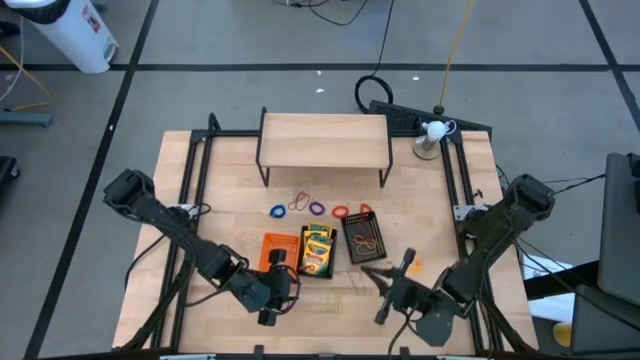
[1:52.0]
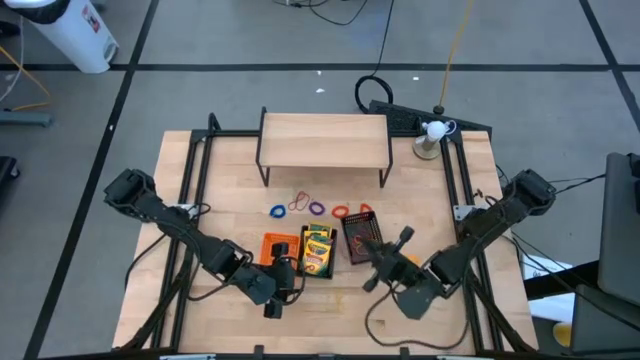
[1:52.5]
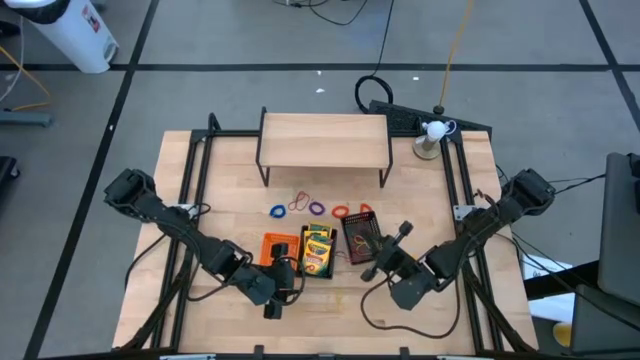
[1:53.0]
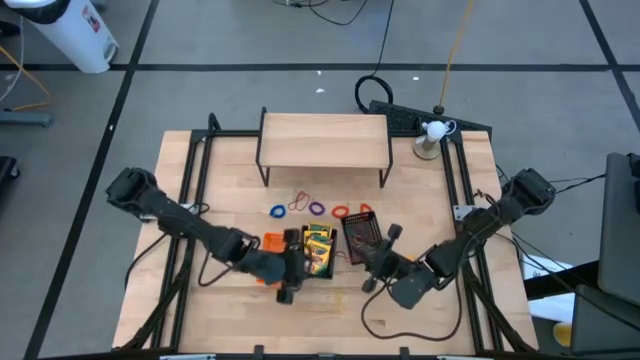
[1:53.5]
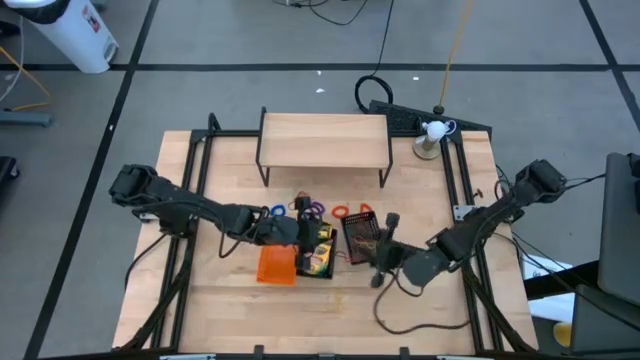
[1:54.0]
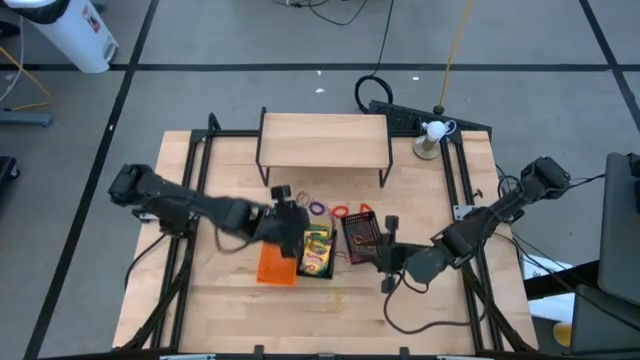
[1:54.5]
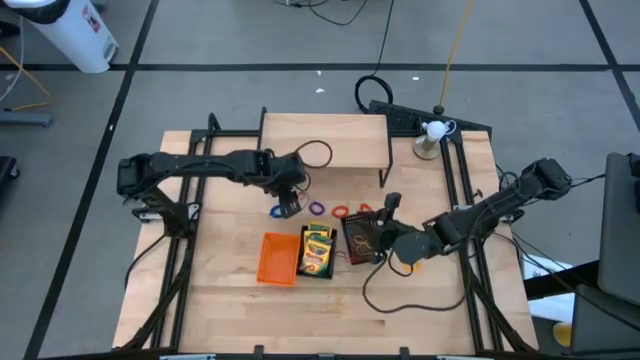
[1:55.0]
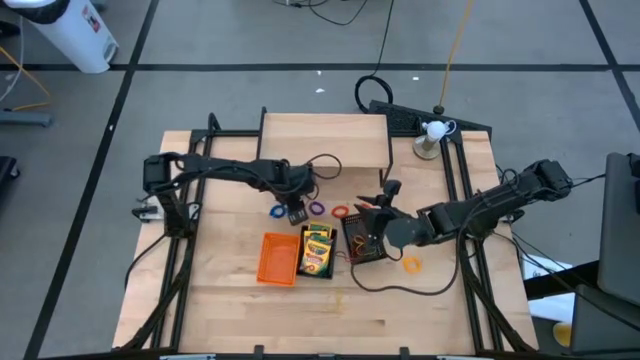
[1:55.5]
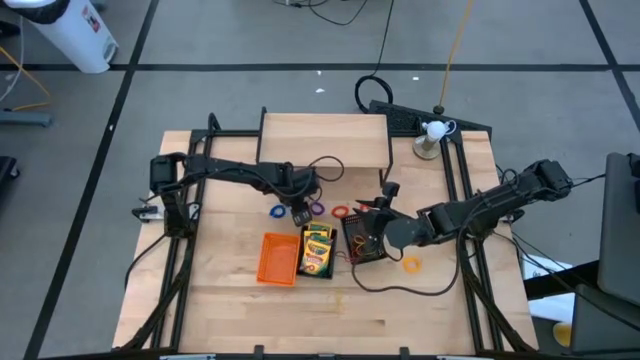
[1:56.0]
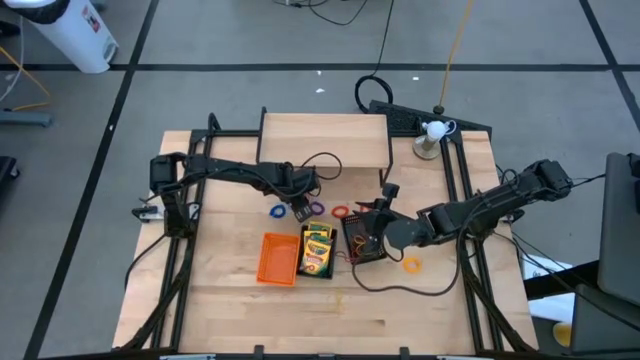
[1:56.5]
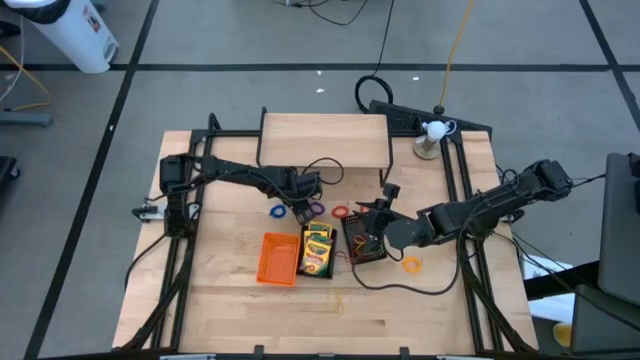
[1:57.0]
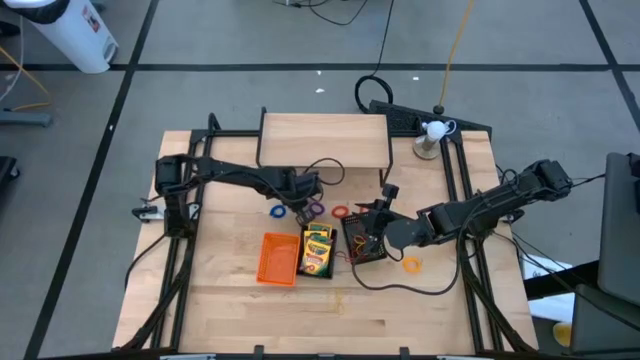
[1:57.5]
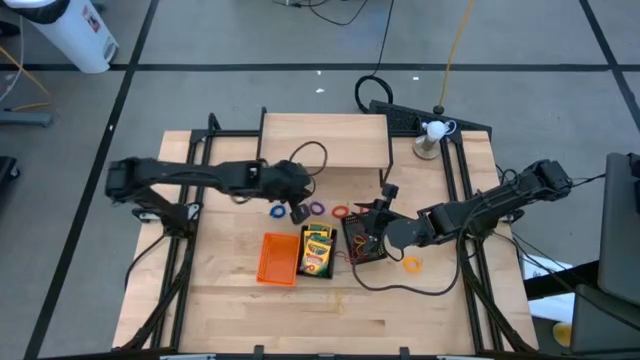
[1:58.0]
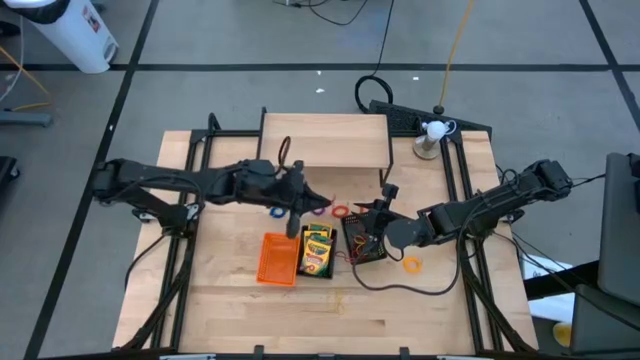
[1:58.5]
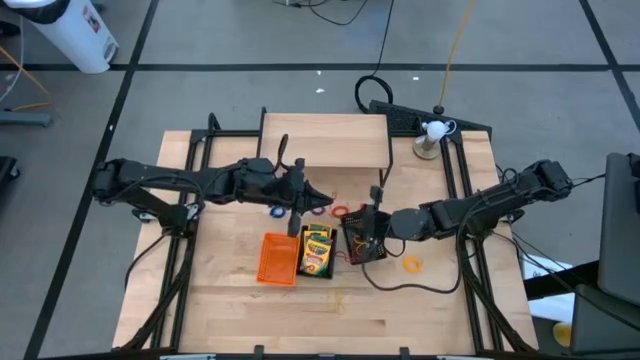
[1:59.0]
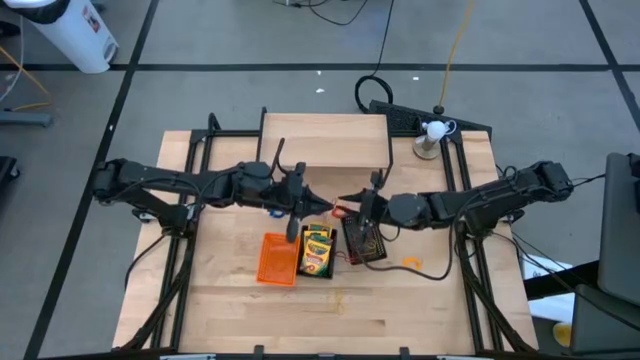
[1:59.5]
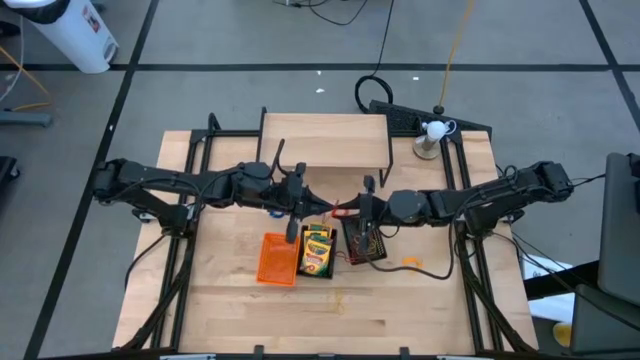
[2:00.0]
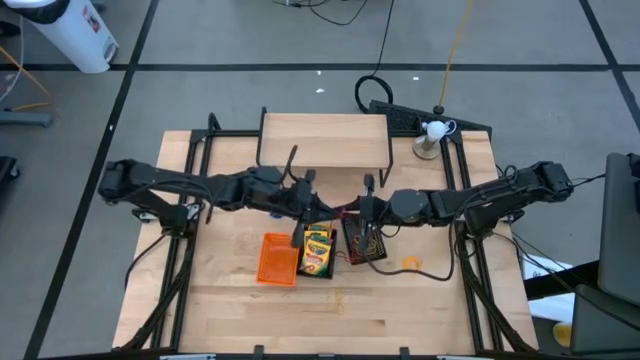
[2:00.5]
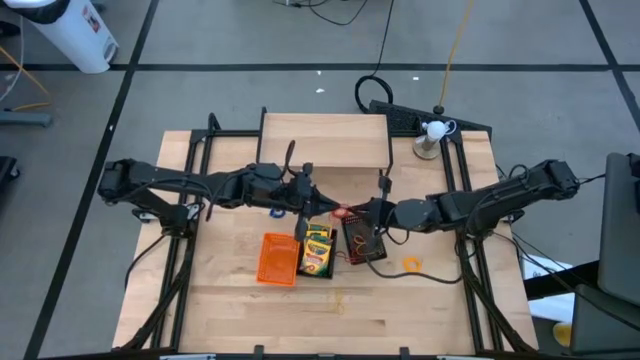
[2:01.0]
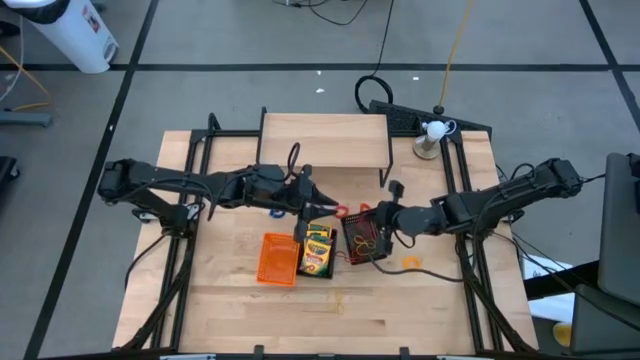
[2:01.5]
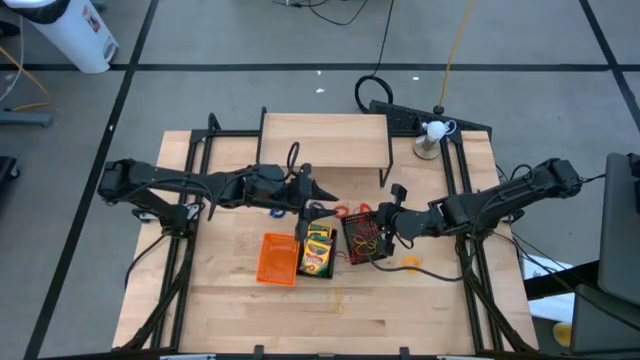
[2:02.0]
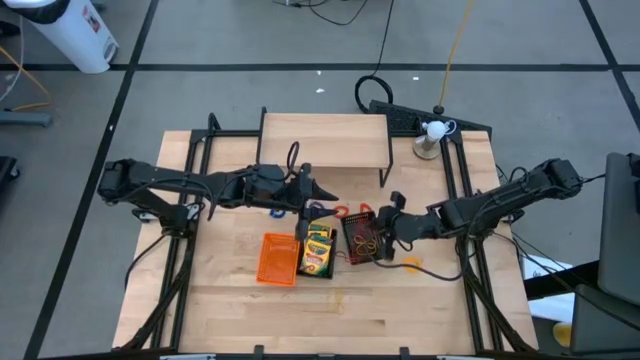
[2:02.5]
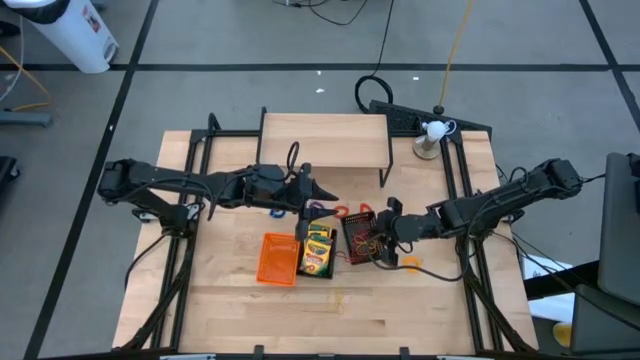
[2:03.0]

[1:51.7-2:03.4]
Task: Pick & Place Office Desk Supplies
Put the red rubber band into the right black bin

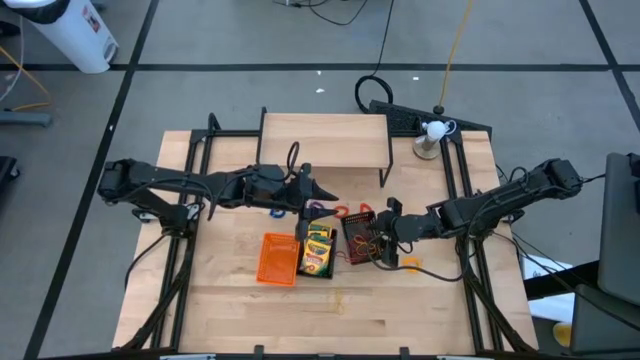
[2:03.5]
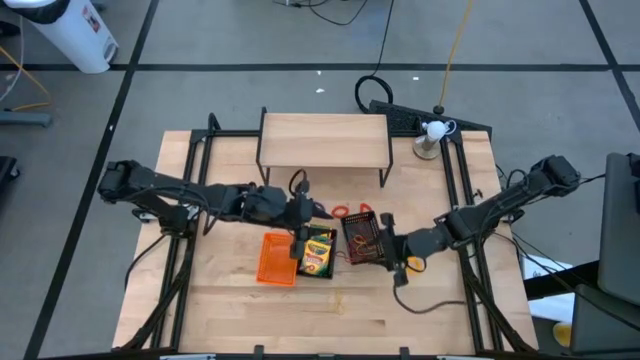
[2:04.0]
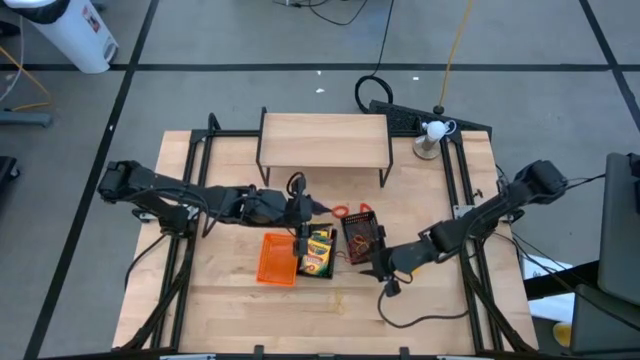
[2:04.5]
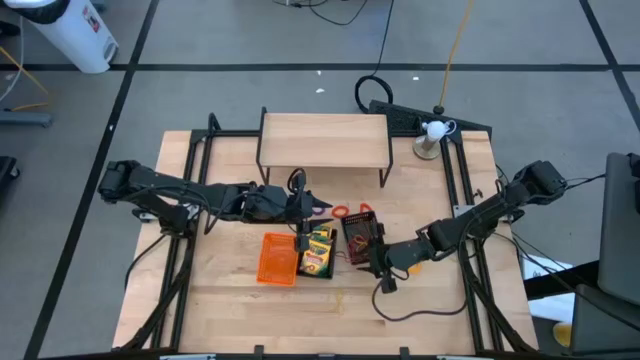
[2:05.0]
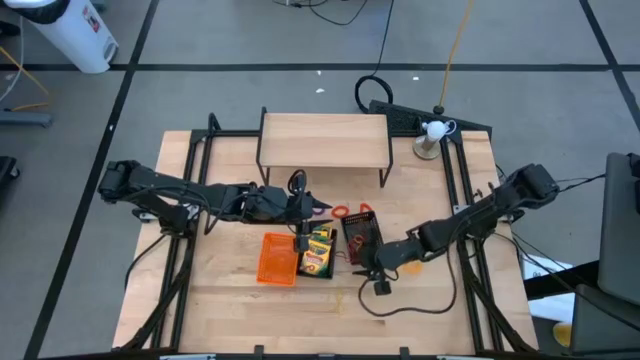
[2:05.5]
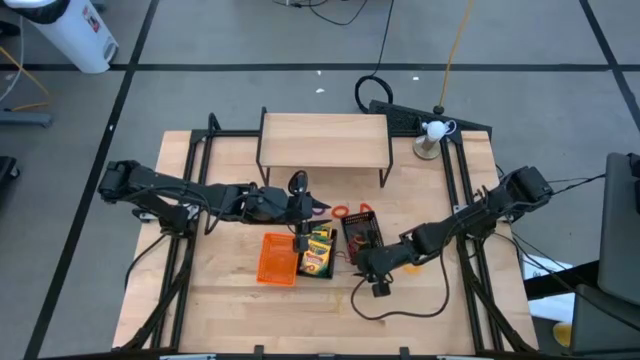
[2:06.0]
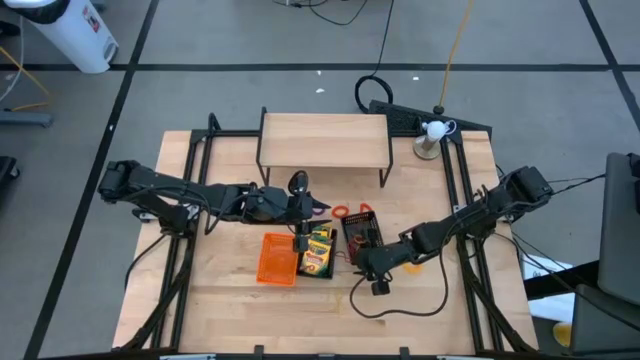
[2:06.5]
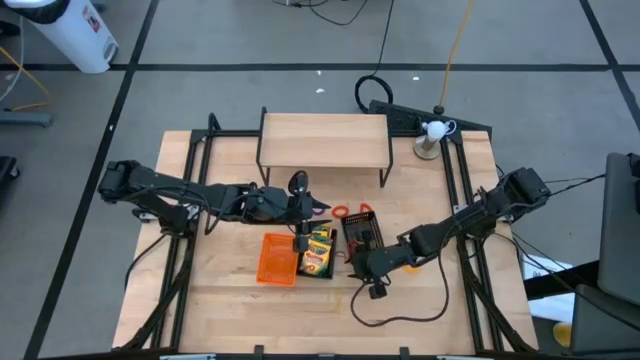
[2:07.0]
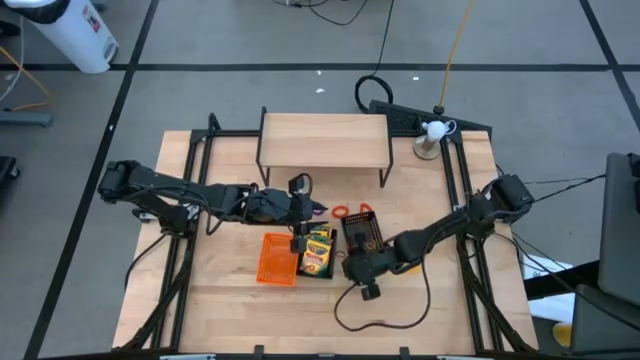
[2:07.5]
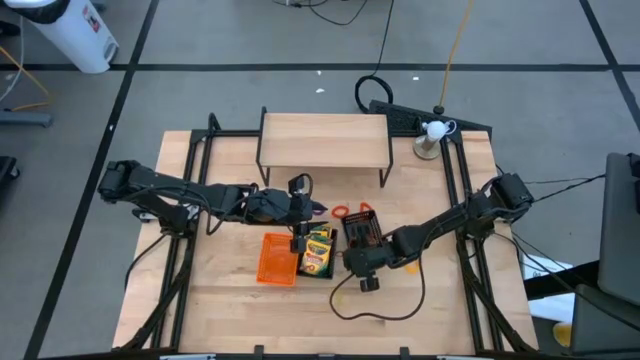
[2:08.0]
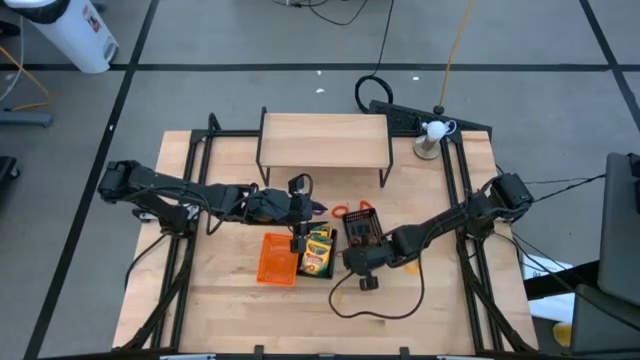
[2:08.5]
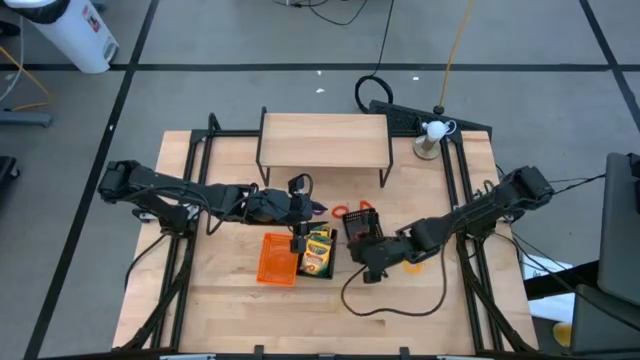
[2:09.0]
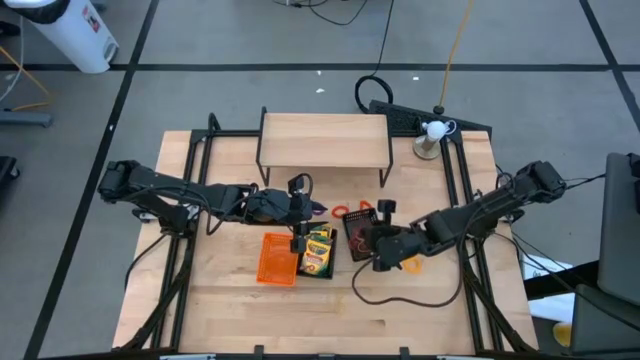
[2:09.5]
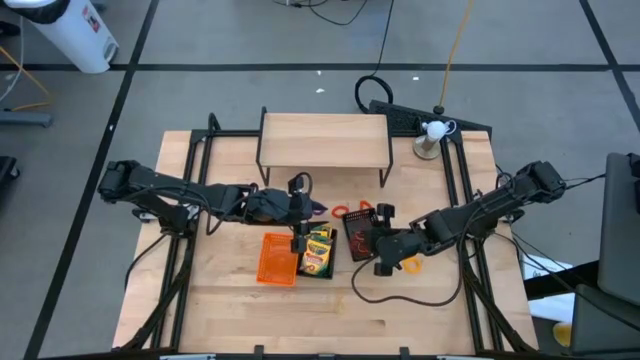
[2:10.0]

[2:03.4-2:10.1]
Adjust the red rubber band in the right black bin

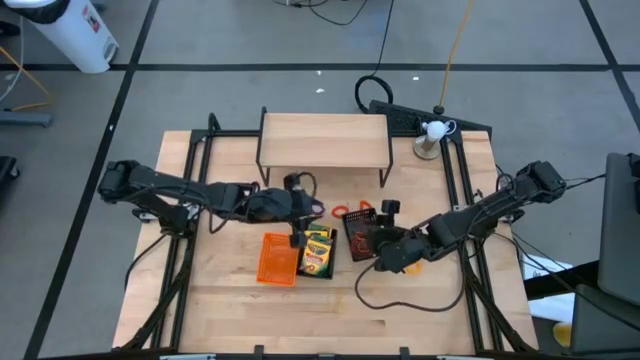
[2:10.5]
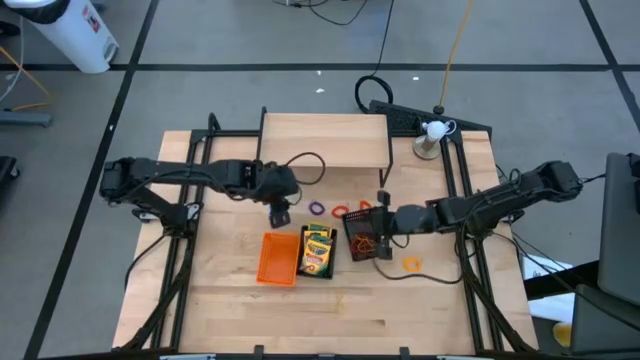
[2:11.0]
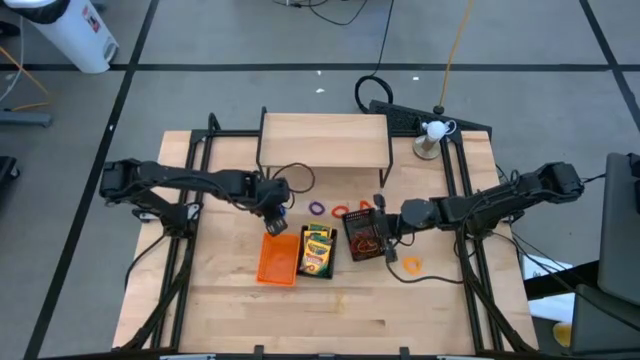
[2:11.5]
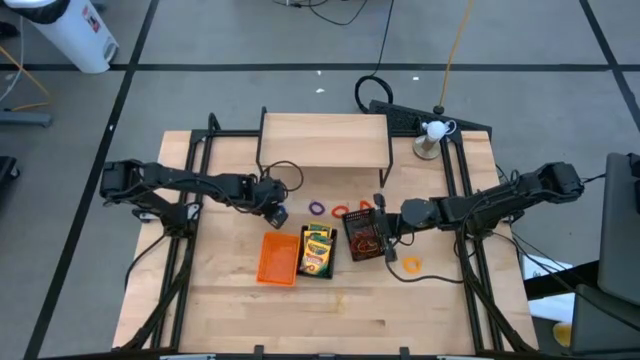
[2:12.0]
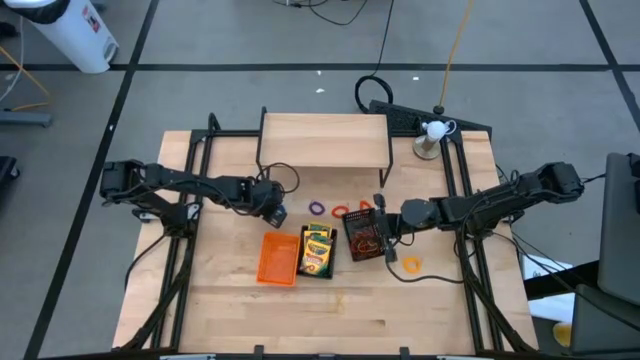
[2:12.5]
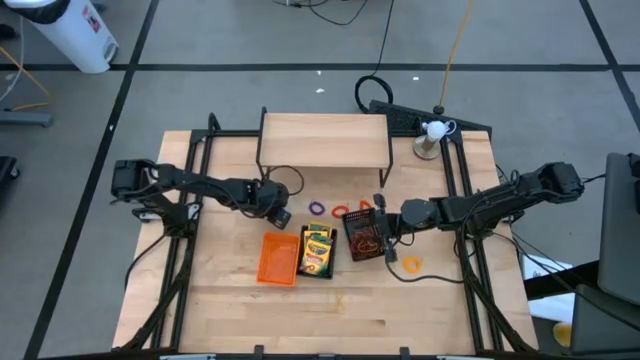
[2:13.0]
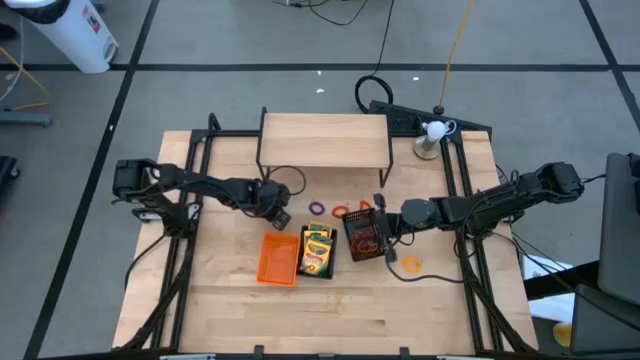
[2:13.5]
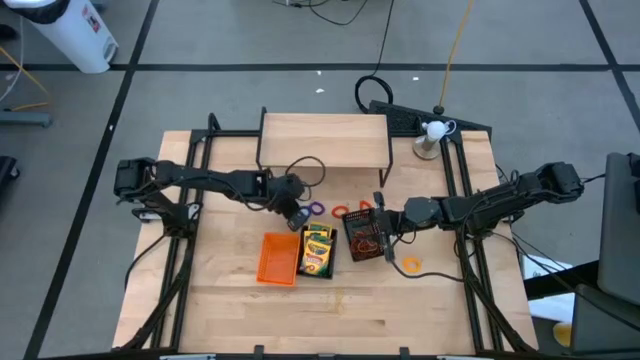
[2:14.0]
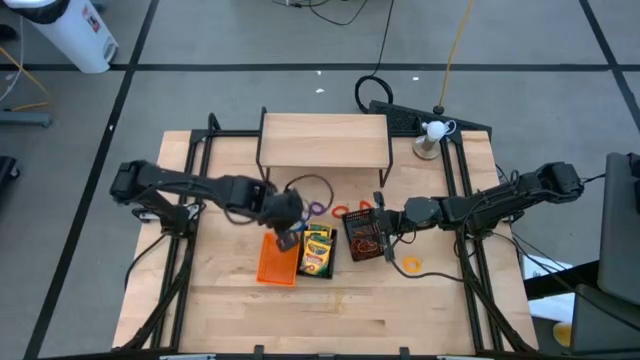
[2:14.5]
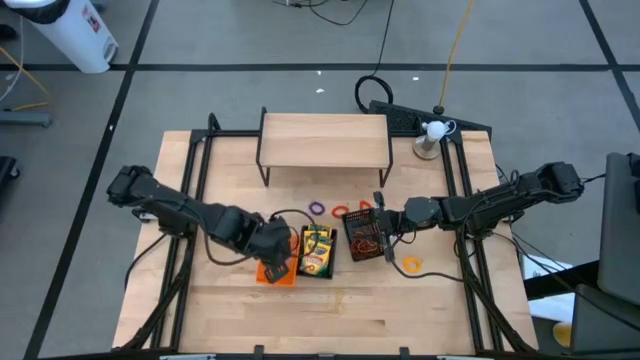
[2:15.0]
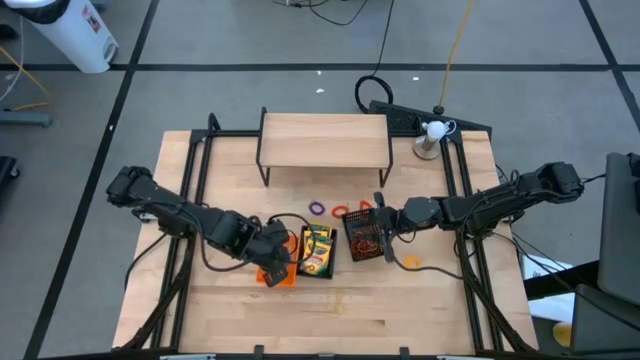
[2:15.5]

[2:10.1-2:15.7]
Put the blue keychain into the orange bin
